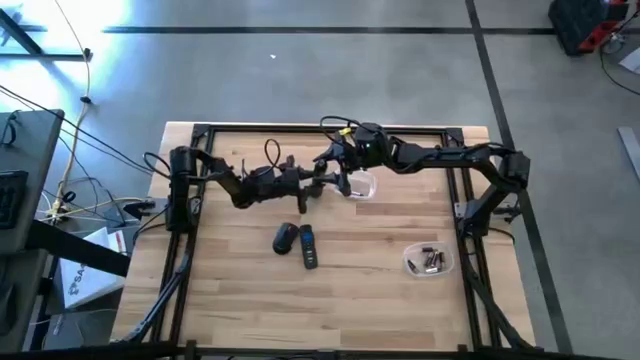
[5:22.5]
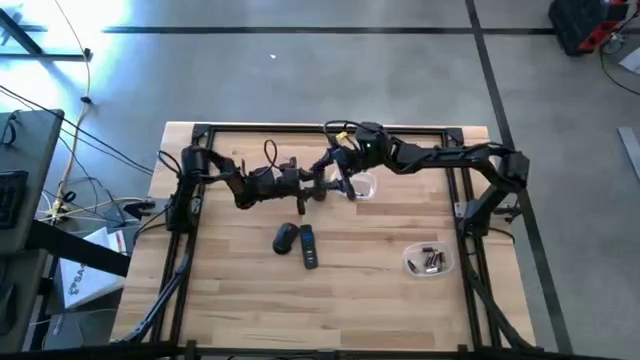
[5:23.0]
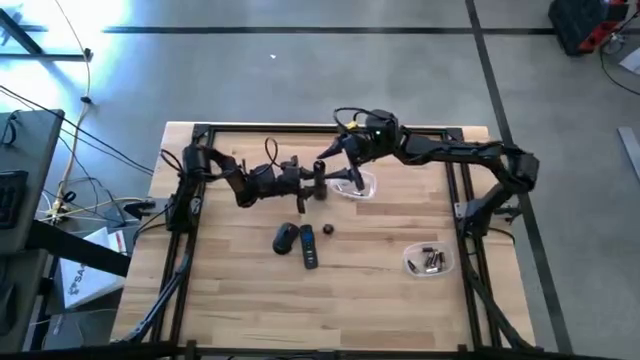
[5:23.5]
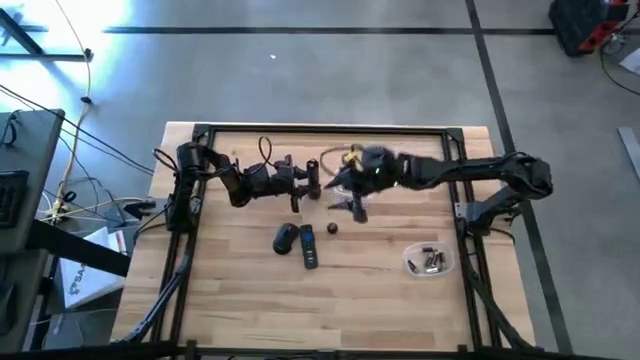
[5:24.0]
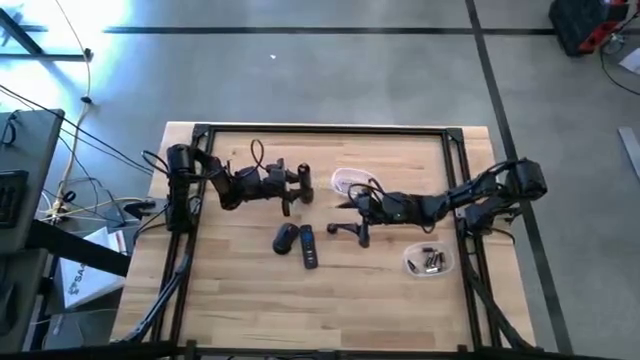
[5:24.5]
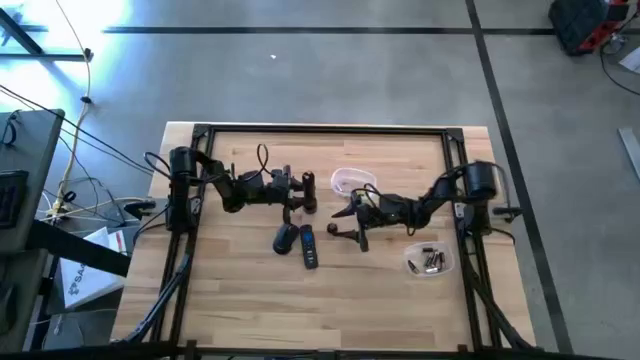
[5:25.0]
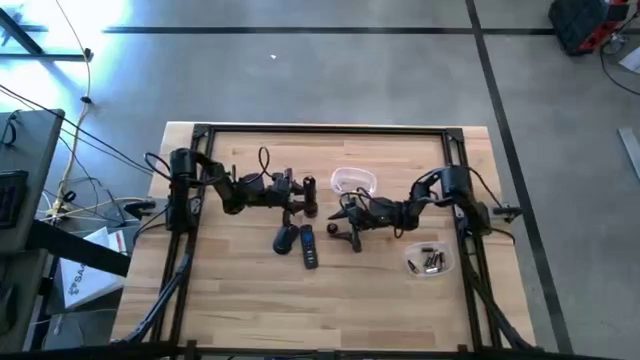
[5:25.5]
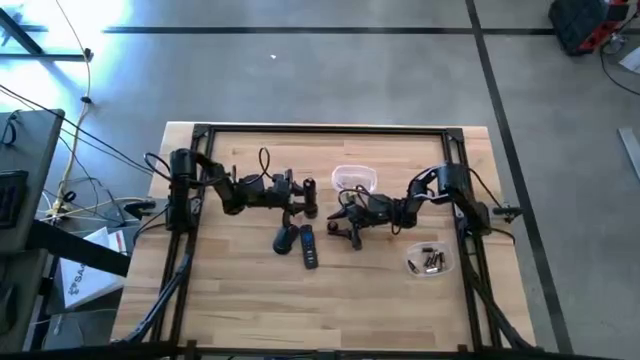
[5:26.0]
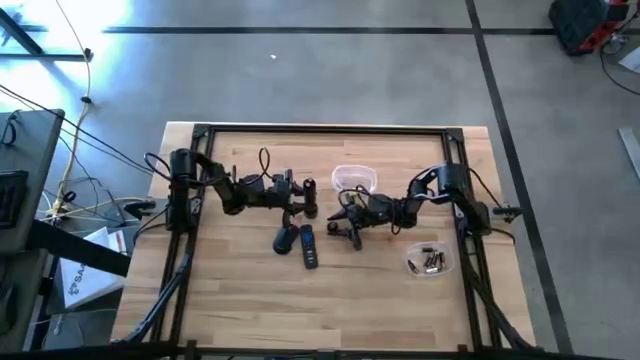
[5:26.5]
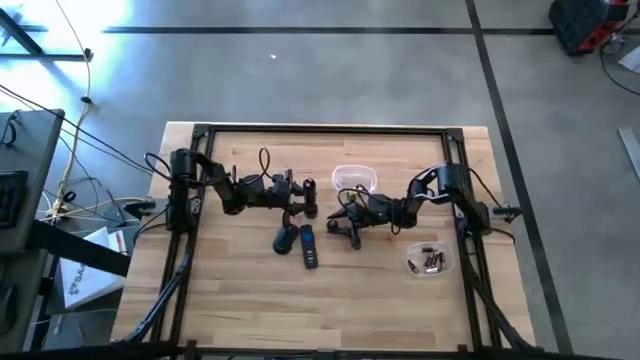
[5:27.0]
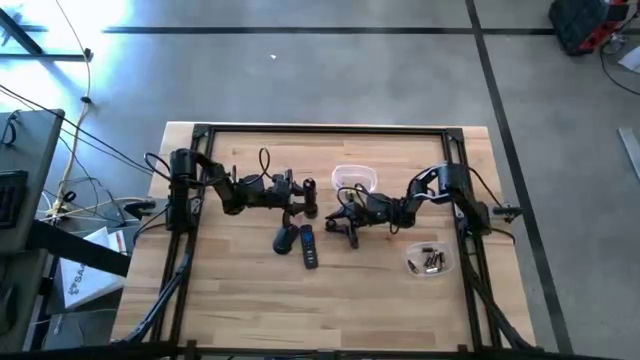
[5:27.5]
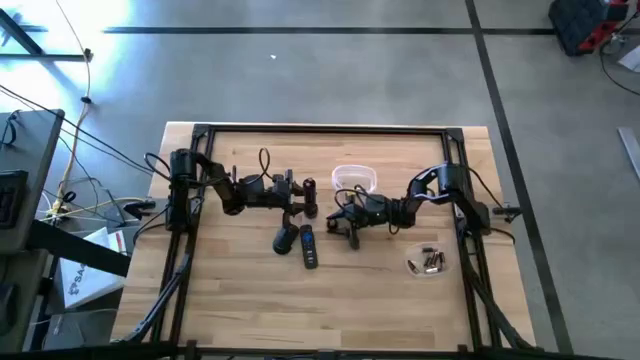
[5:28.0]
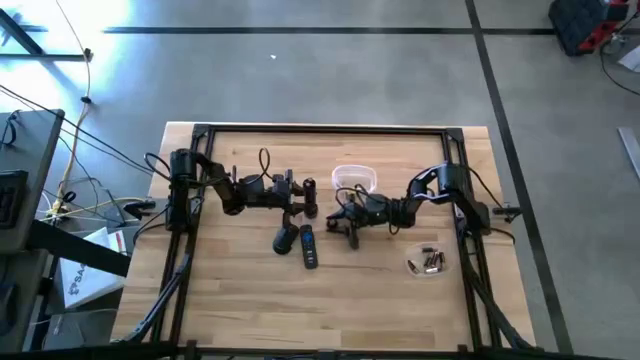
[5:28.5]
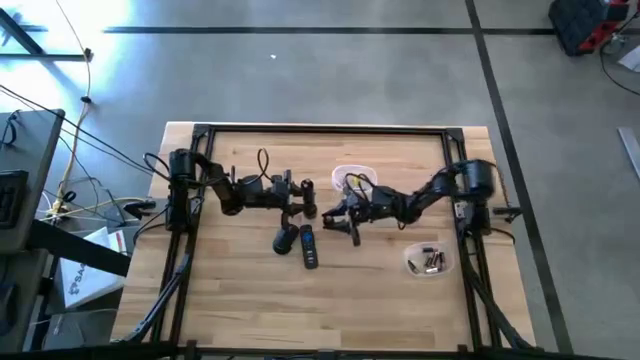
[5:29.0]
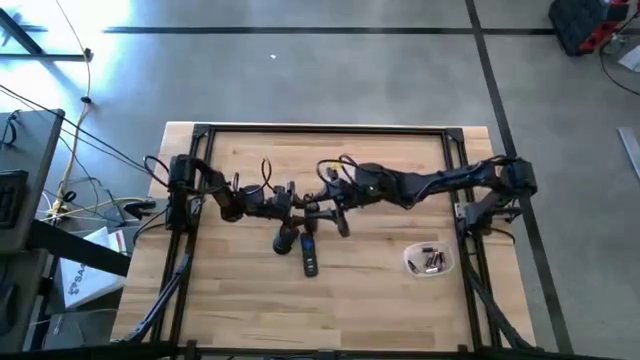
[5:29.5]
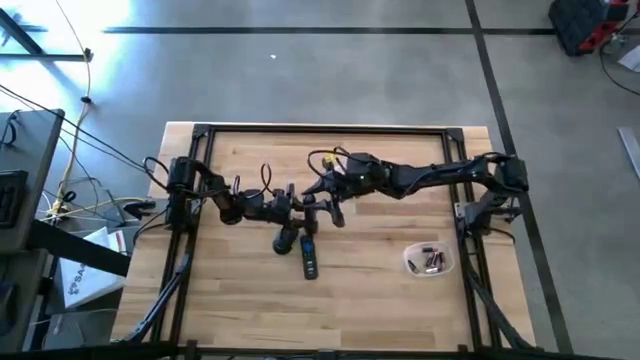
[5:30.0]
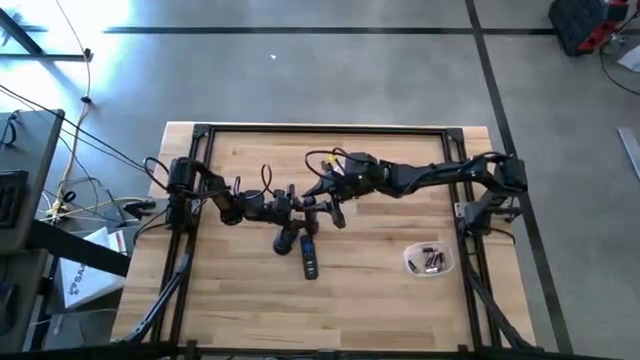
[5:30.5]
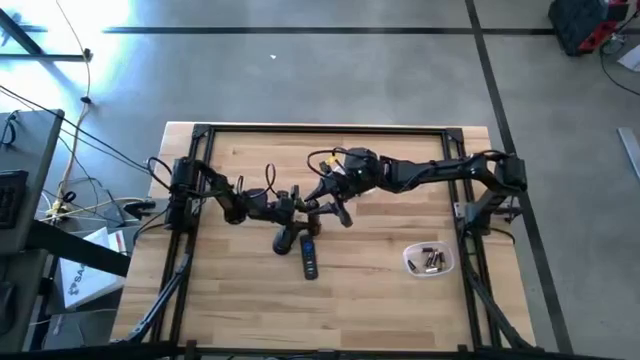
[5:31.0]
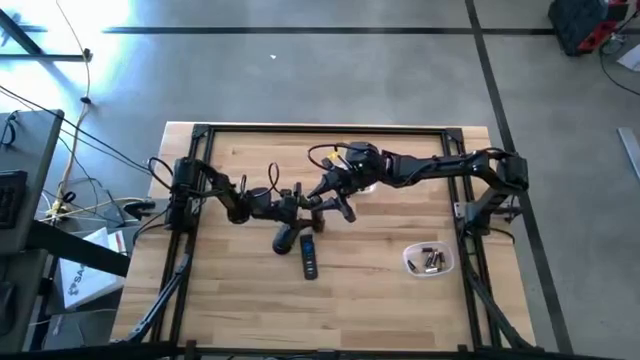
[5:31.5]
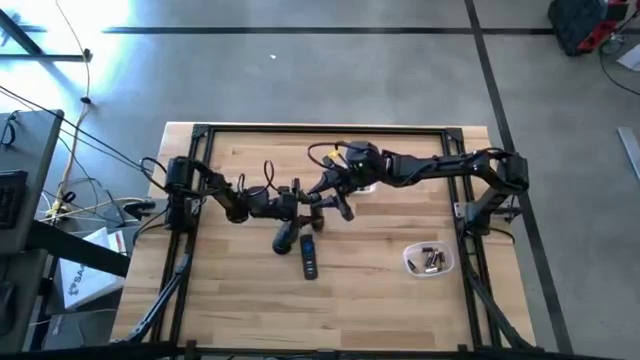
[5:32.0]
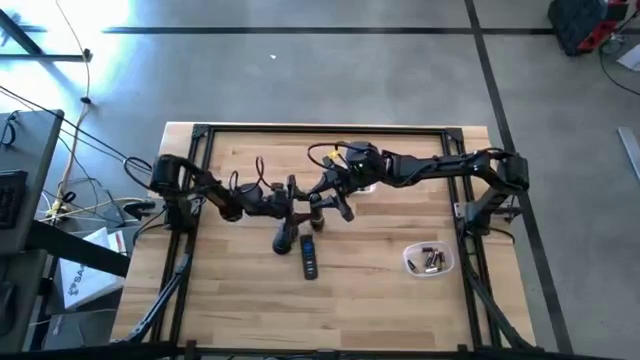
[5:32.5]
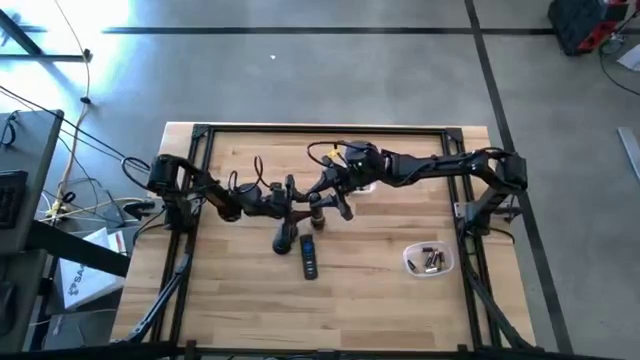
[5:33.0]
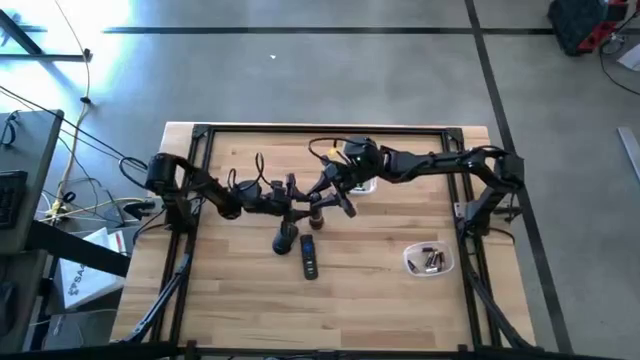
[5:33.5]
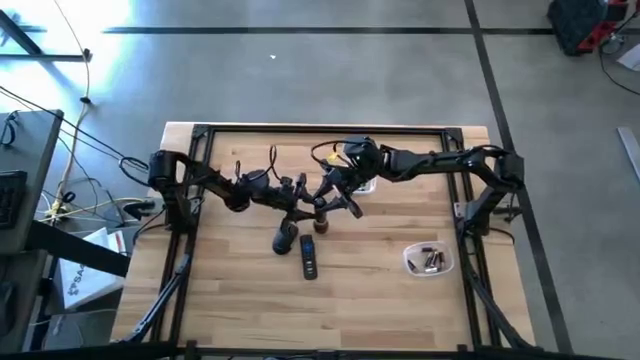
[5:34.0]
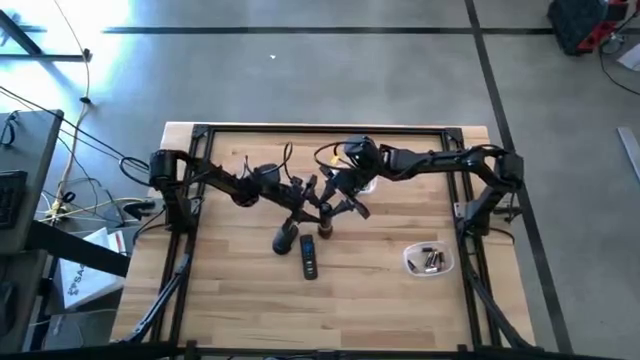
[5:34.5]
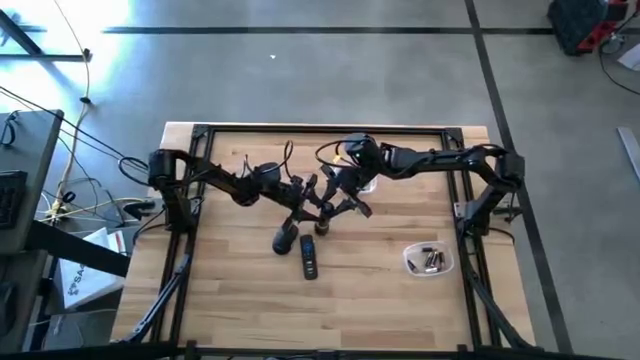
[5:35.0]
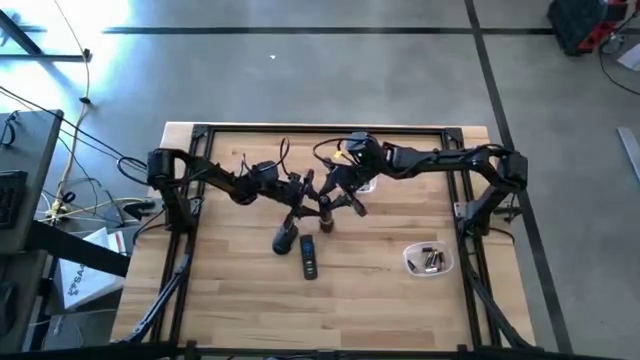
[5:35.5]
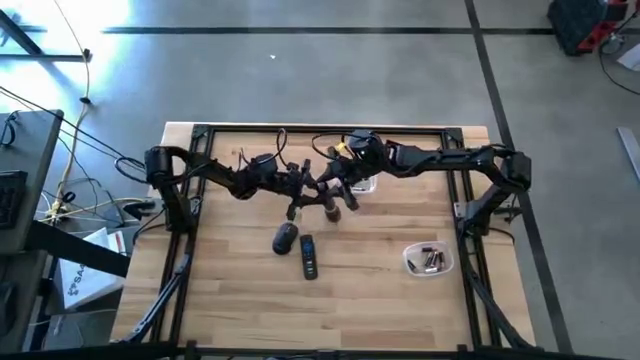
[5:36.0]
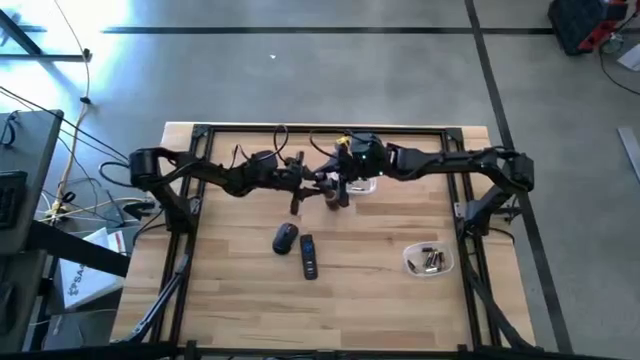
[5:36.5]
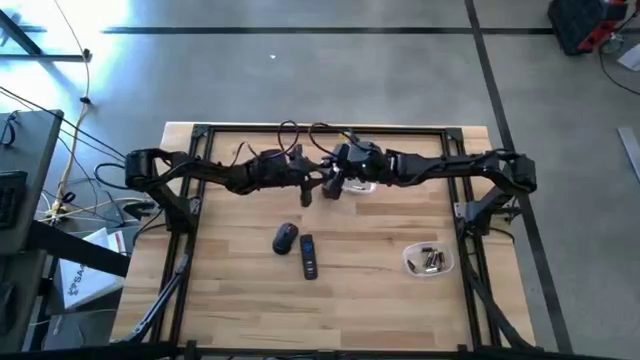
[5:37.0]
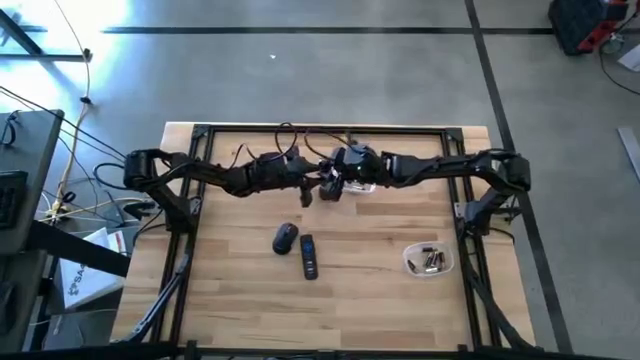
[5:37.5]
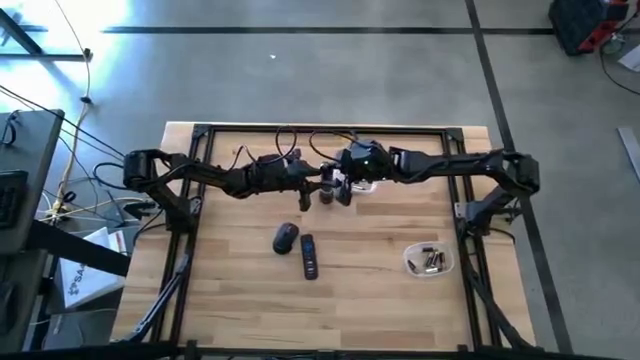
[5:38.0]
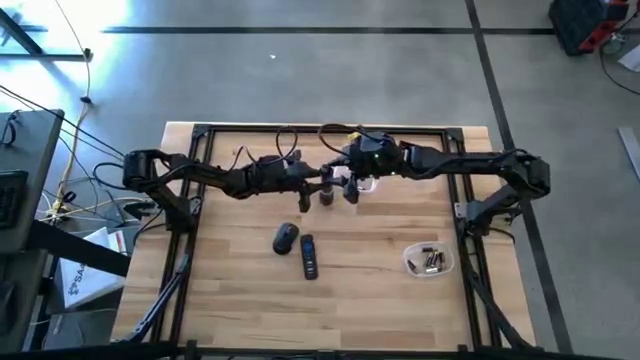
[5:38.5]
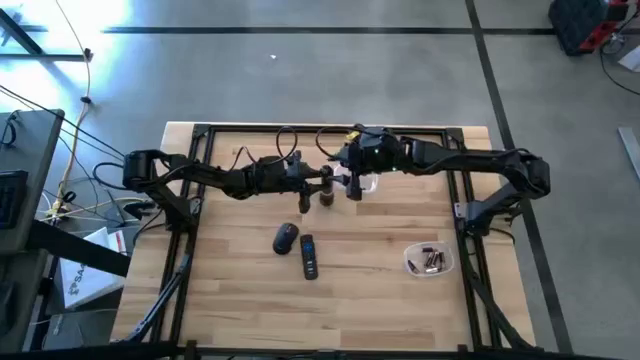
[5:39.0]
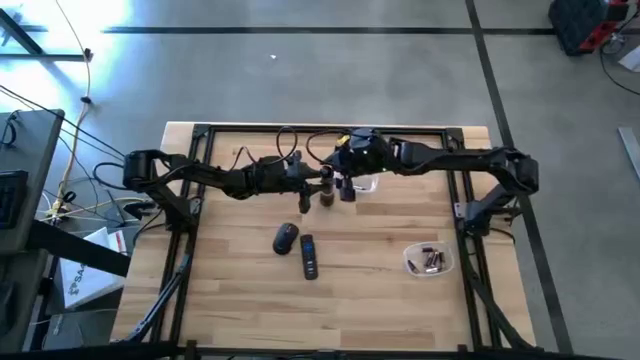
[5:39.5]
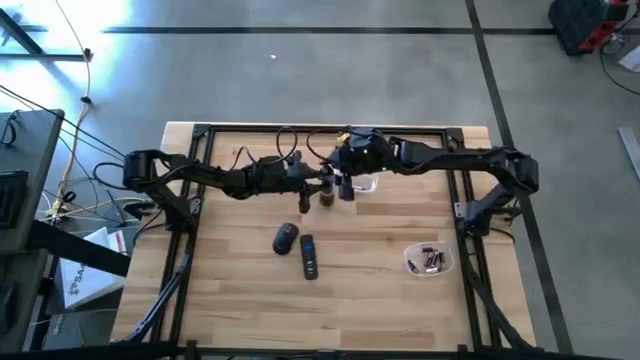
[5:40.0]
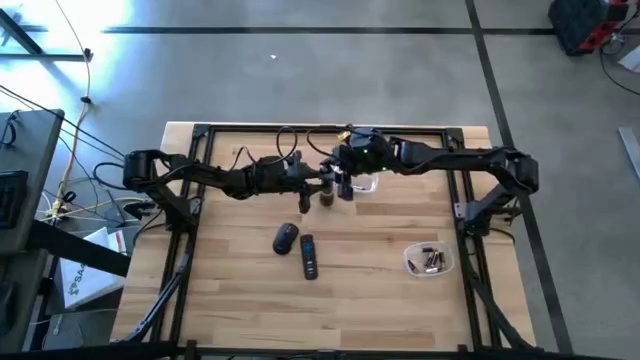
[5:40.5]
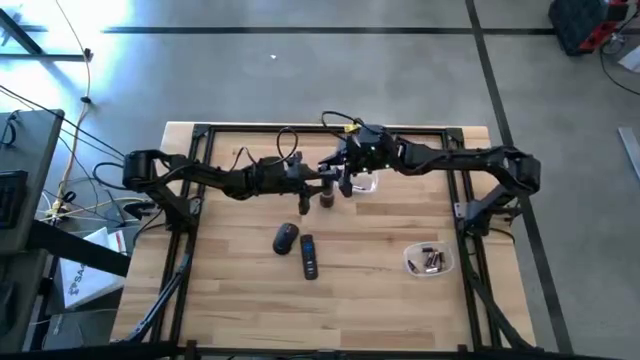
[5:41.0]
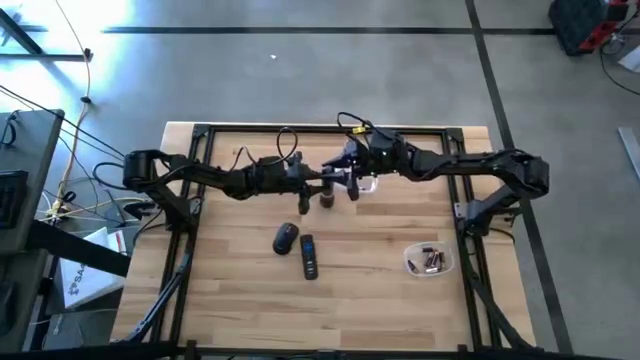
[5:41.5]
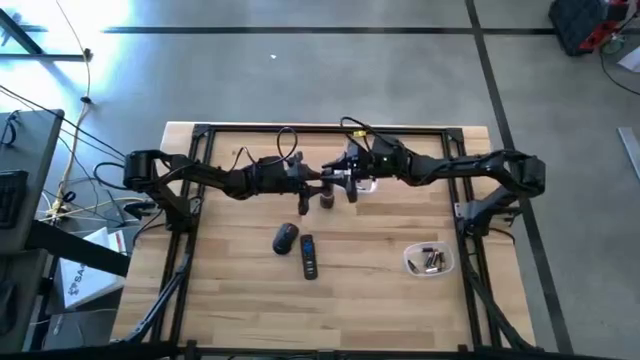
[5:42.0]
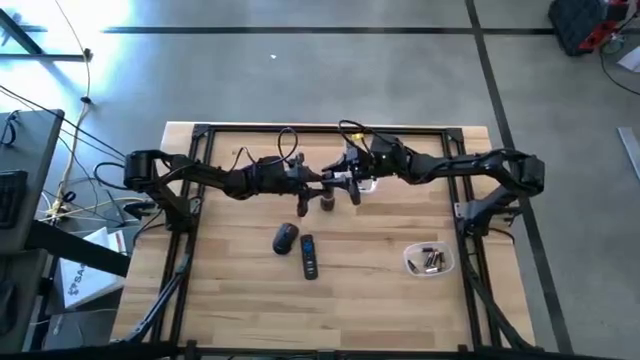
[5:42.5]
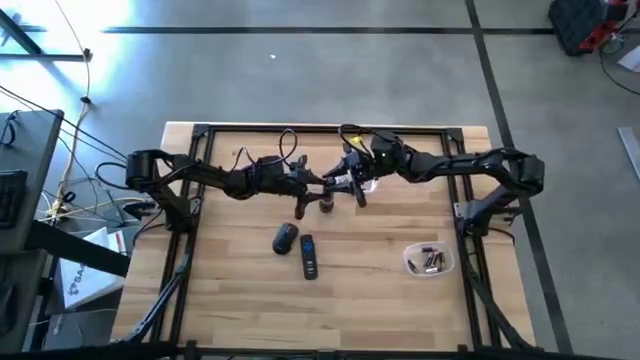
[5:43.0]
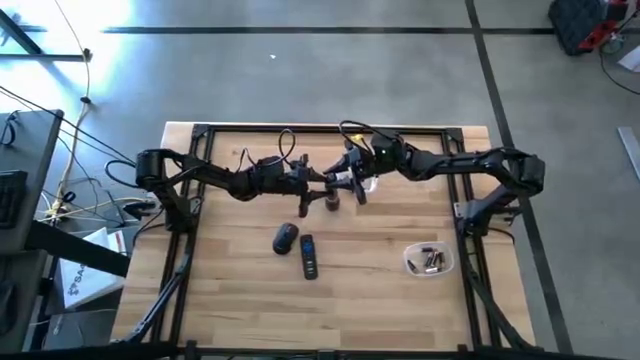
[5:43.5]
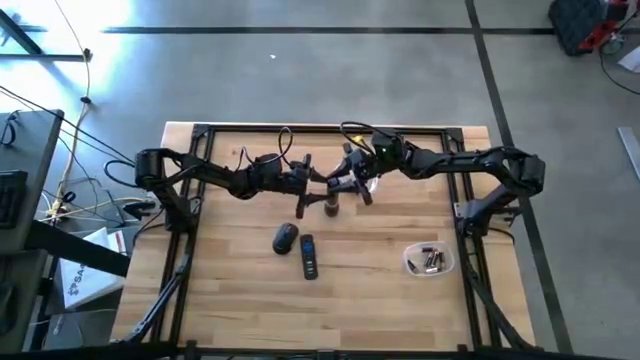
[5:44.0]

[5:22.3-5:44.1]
Task: Insert battery
Close the flashlight battery compartment
